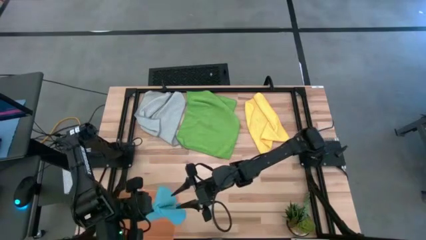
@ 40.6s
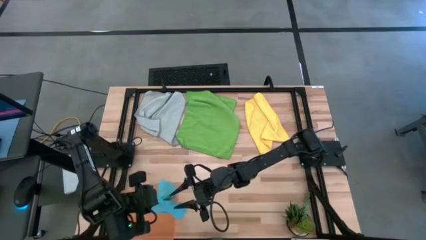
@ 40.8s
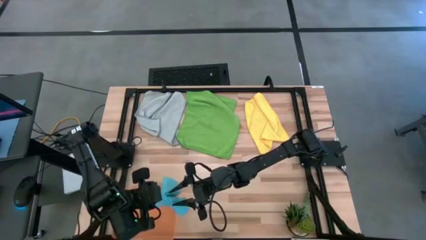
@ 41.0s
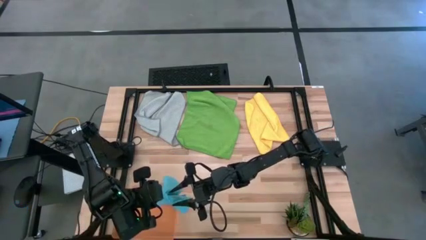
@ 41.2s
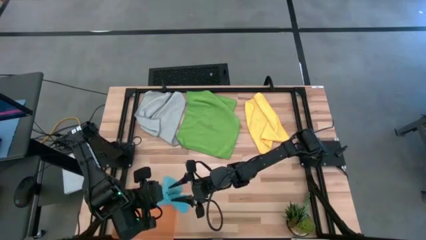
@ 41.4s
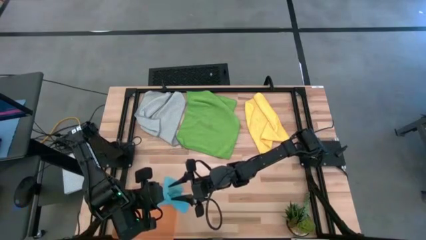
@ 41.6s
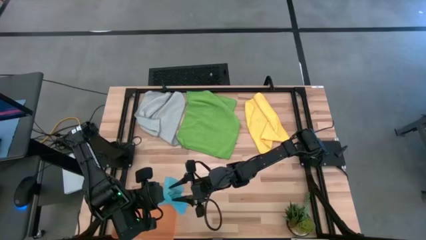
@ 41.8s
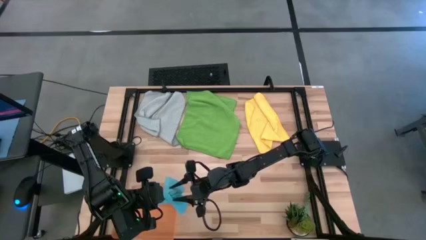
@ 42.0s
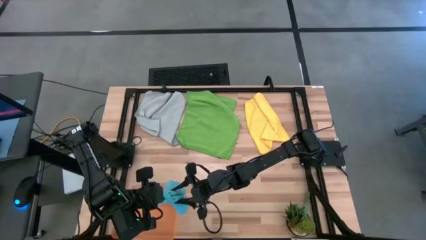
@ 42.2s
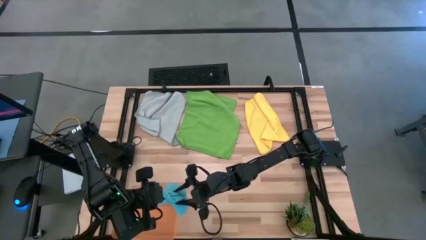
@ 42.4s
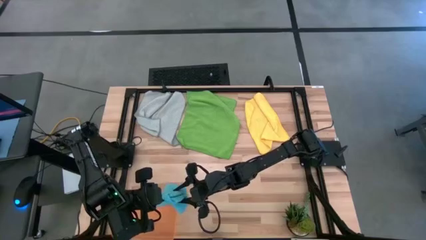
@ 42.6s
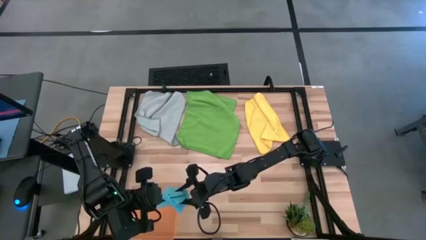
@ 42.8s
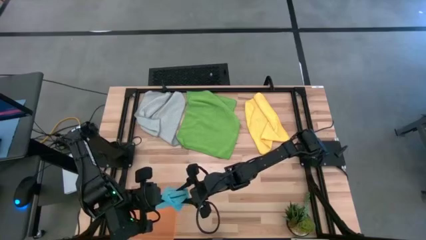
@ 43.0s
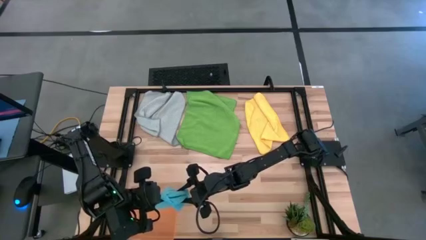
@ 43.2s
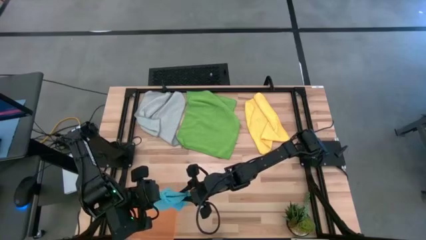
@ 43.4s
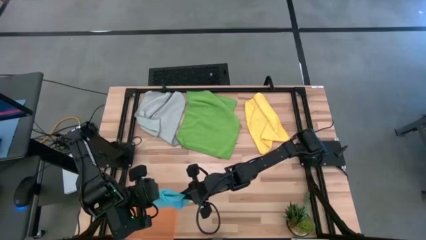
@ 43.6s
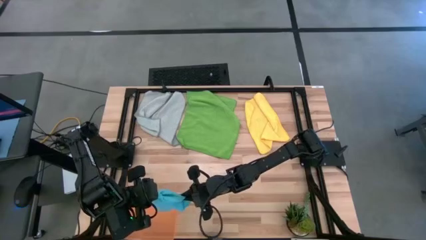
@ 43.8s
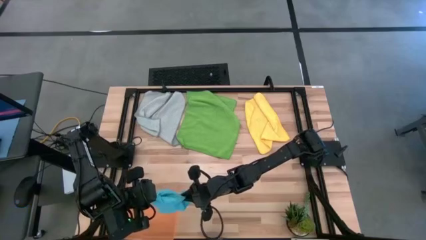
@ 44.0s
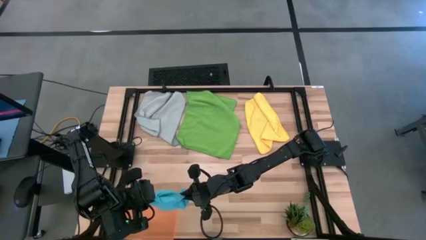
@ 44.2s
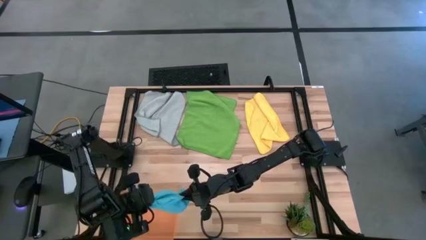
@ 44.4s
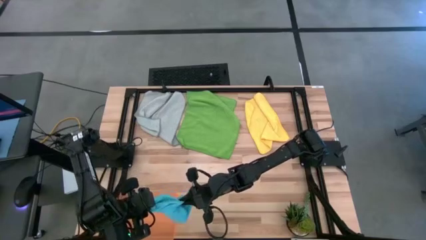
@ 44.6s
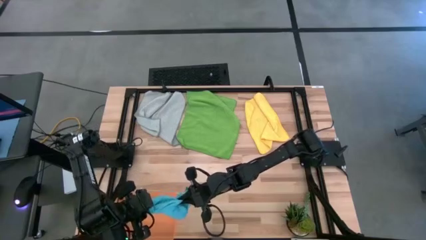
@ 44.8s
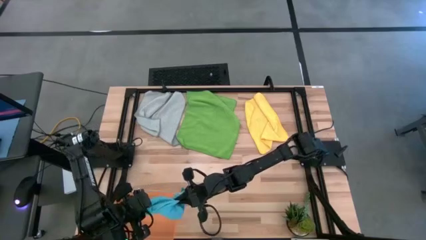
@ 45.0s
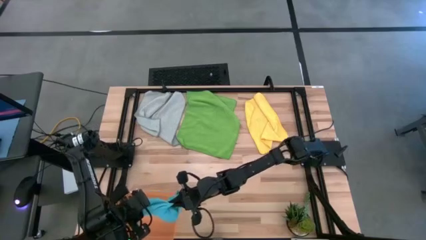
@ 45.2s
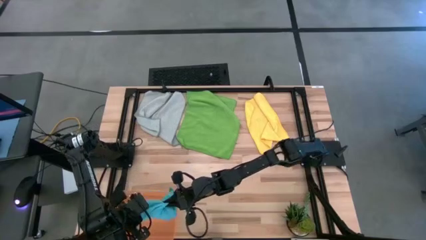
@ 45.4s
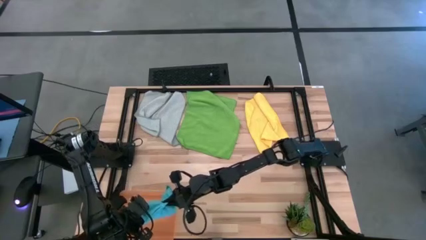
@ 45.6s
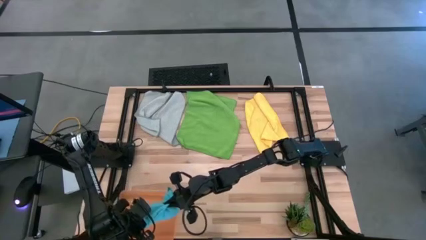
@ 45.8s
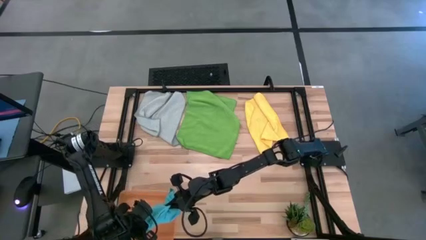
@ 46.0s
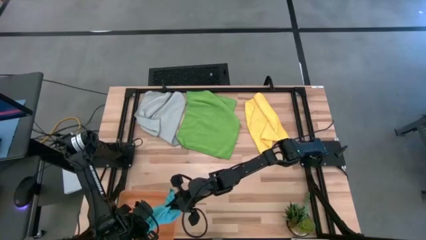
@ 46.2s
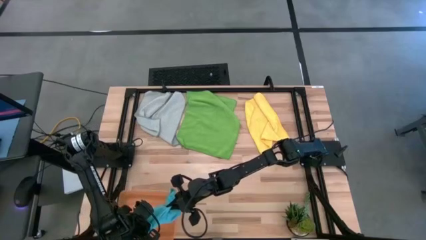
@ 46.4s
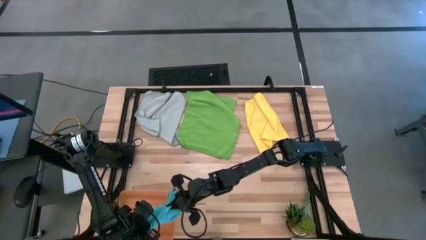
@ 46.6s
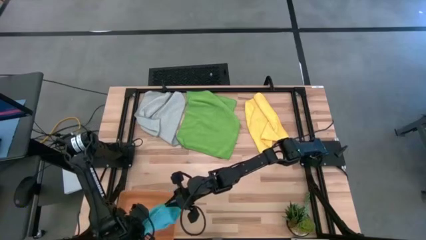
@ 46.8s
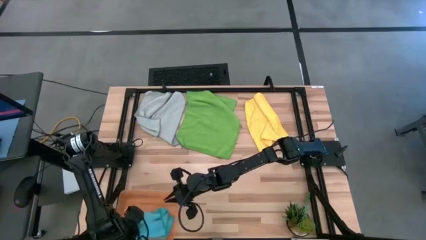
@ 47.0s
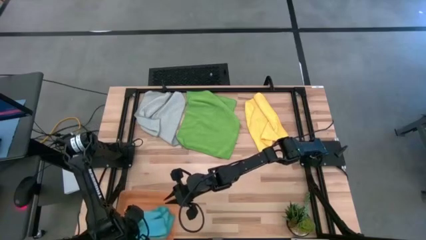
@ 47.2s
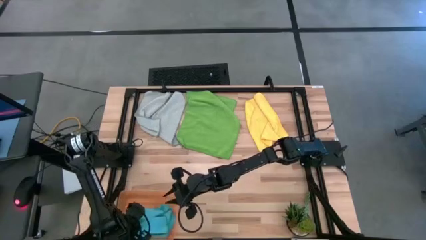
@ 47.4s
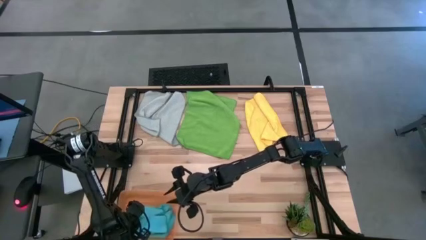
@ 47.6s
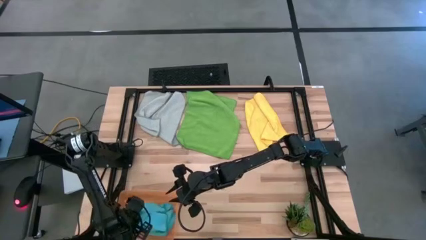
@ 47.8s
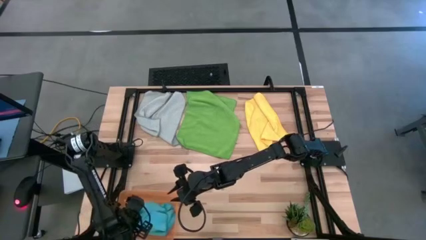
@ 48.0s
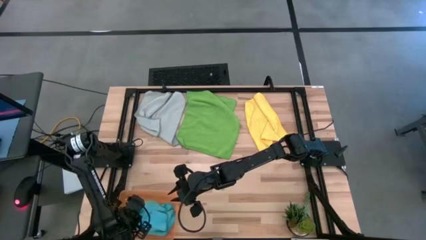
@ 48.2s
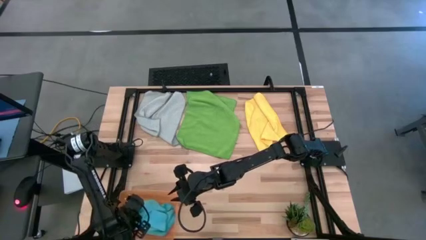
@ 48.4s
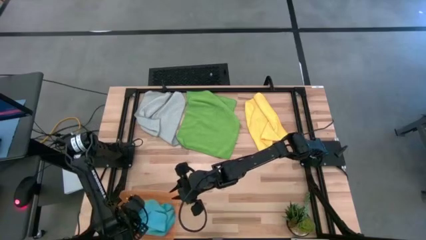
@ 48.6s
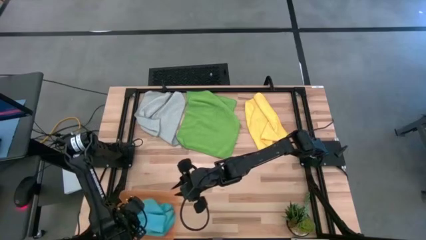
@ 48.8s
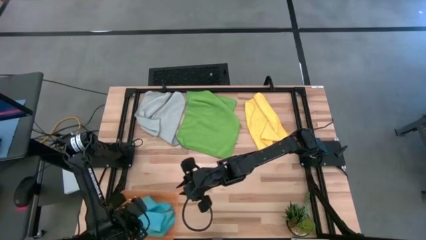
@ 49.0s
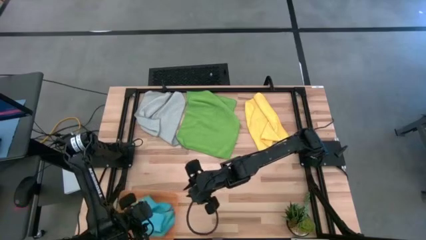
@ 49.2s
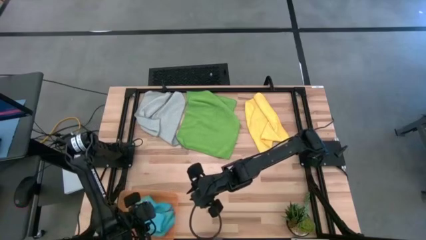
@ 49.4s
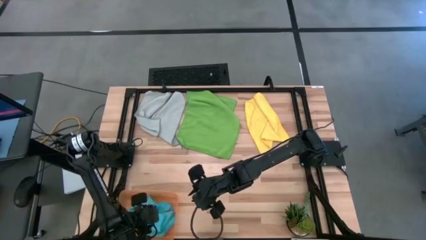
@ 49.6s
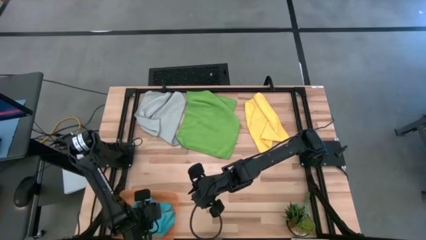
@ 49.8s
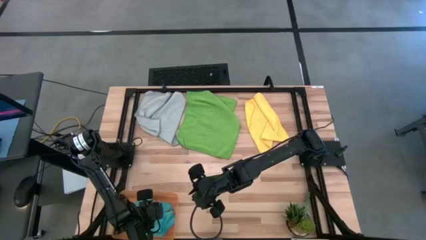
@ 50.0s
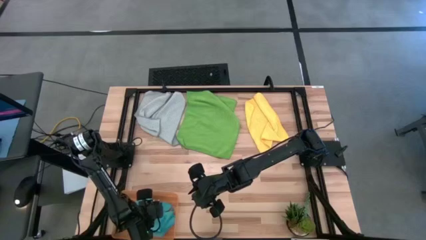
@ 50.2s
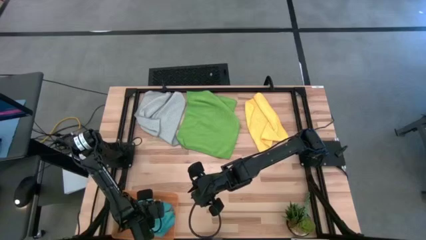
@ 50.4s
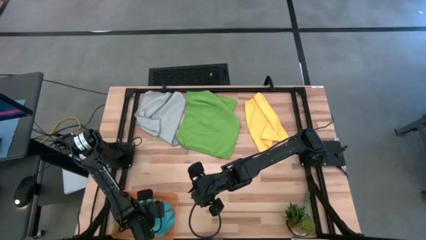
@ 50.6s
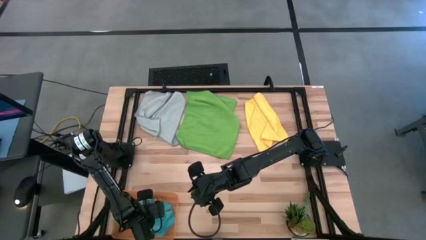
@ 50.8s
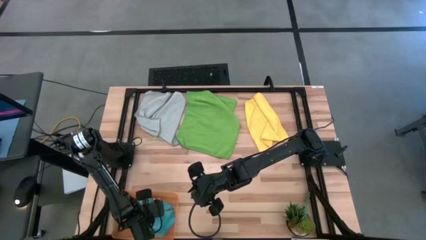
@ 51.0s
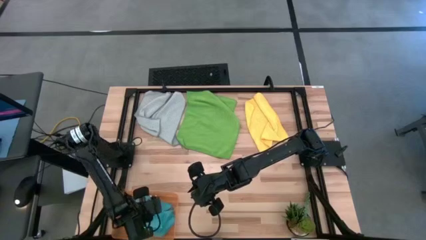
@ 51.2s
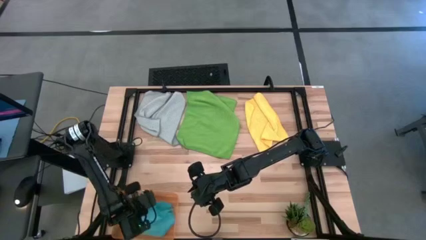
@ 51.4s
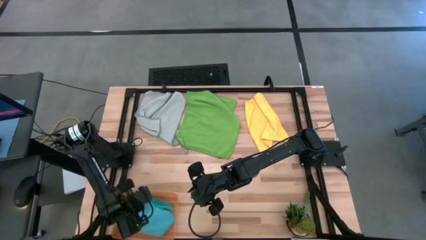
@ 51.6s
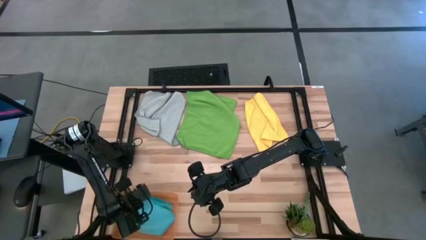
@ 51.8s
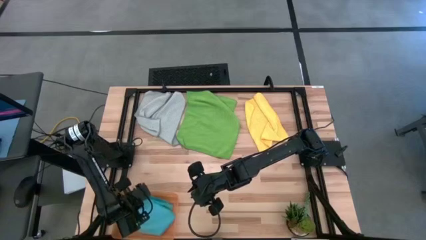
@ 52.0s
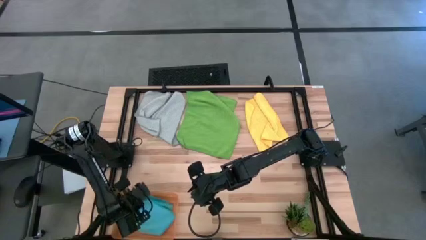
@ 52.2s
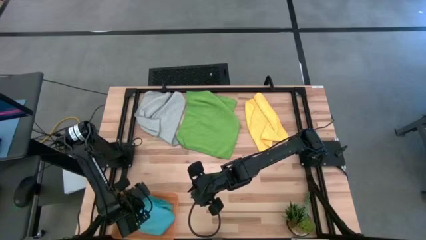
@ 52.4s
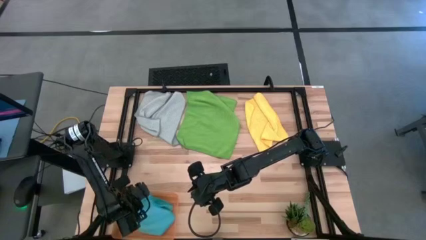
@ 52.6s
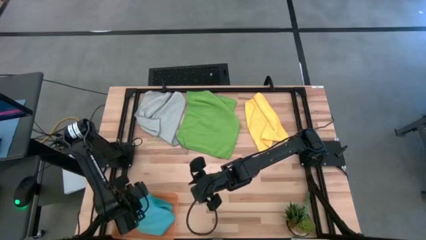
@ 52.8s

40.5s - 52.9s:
Task: Fold microfiber towels
Put the blue microfiber towel into the orange bin

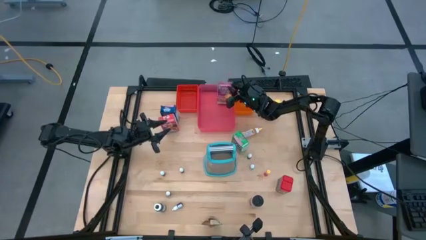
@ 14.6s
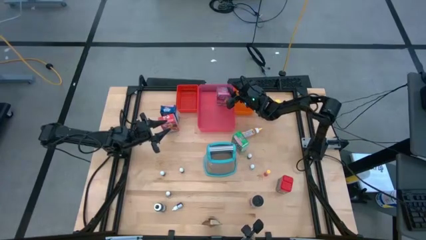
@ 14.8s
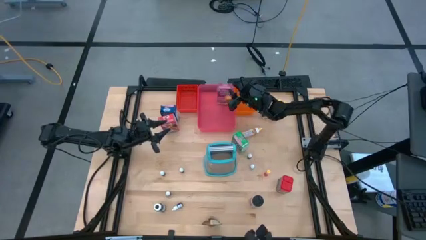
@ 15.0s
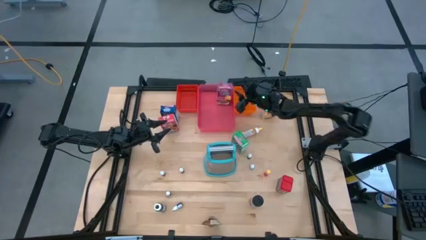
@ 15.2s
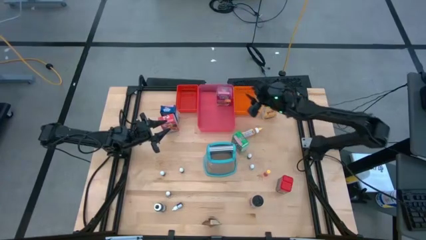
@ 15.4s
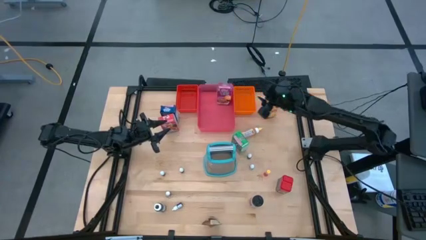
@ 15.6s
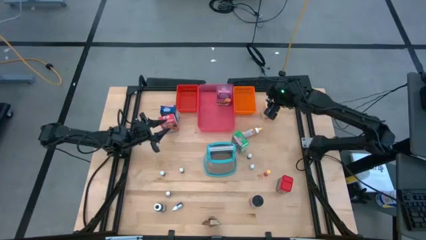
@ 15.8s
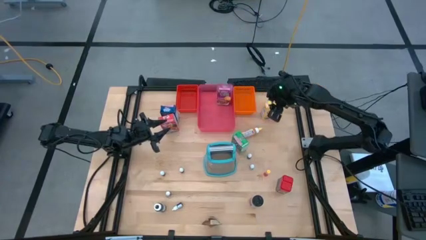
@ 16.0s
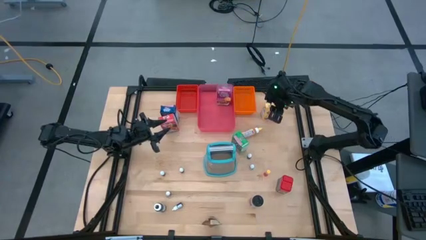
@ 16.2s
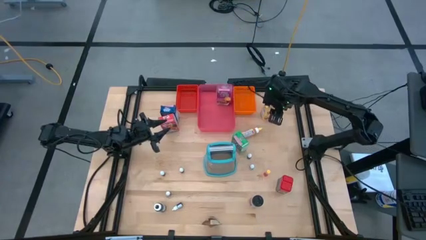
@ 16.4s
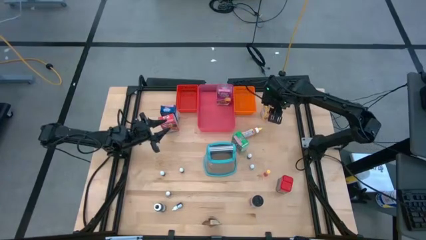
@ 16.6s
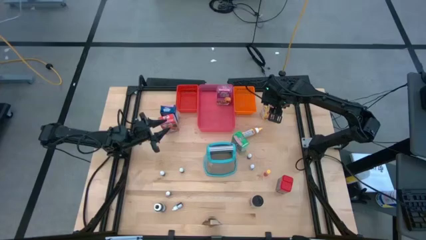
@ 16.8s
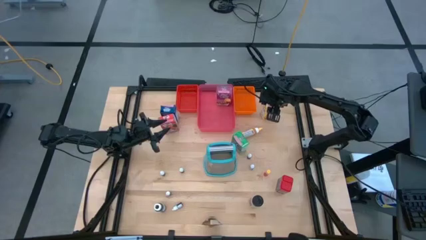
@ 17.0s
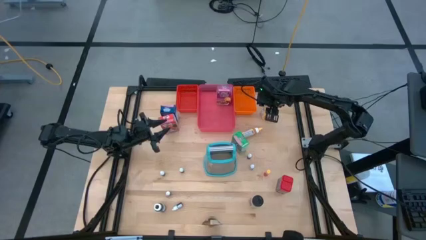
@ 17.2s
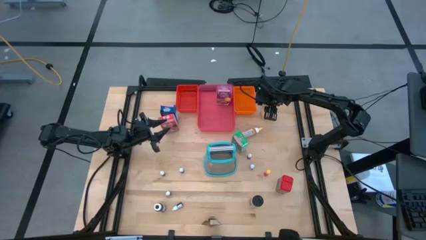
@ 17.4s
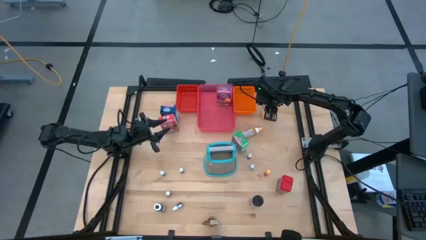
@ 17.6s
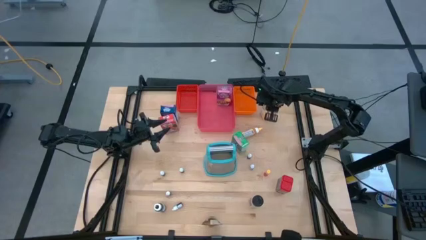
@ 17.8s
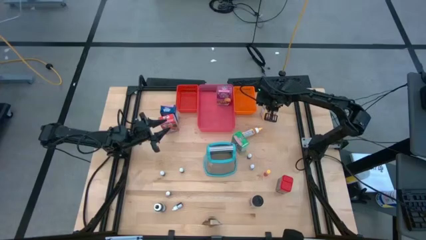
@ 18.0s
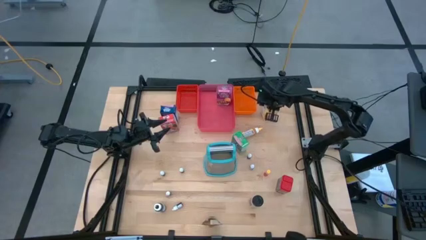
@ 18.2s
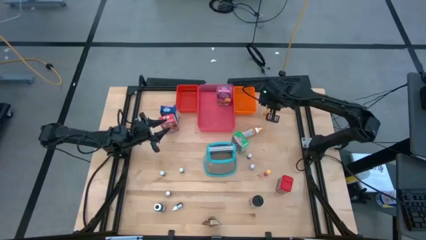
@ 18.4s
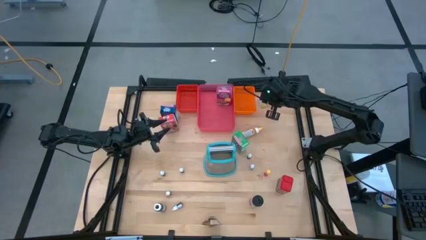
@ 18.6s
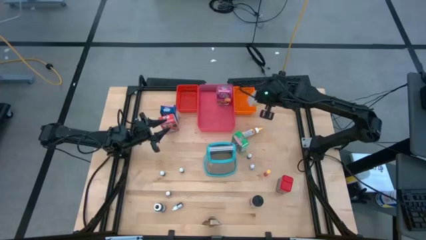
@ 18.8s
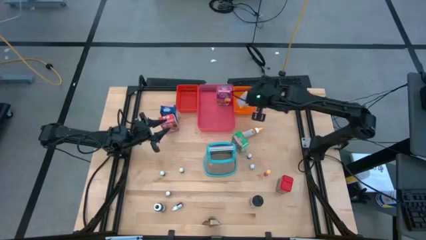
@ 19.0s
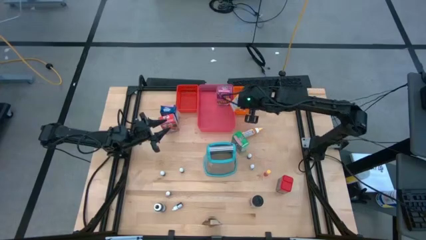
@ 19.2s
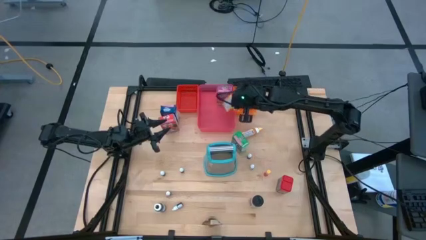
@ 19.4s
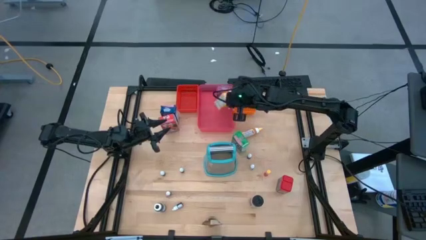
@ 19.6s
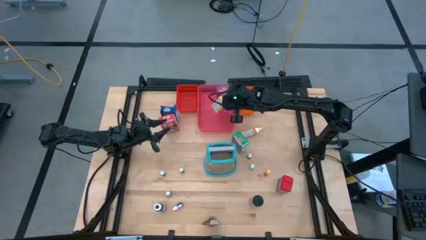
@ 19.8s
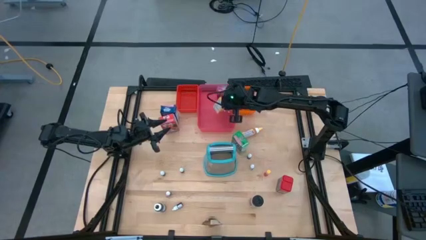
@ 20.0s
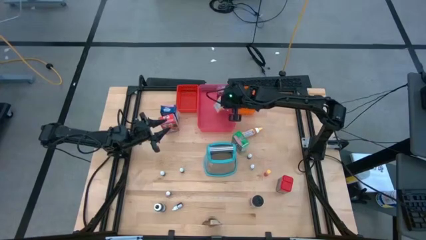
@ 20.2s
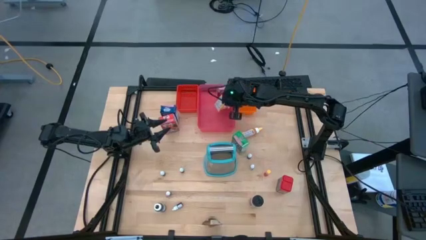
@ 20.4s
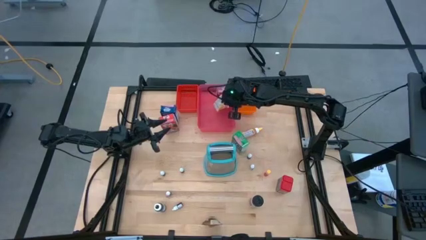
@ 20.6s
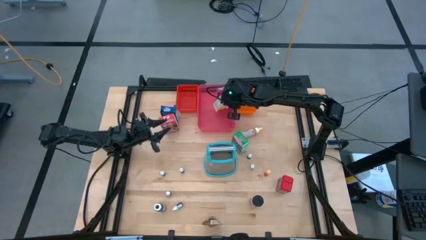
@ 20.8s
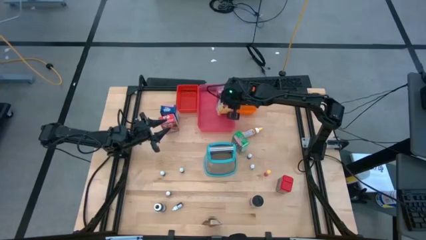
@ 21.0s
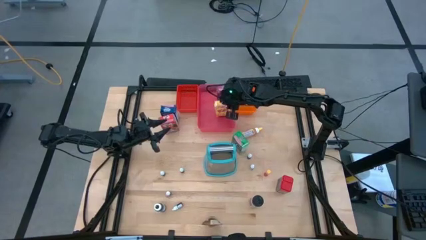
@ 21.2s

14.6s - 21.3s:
Task: Pick & Place Kitchen Items
Put the yellow cereal box into the pink bin
